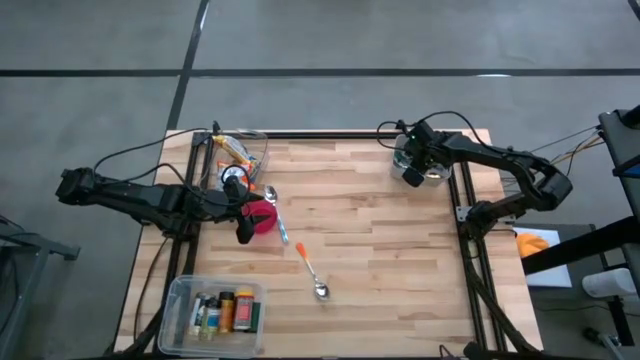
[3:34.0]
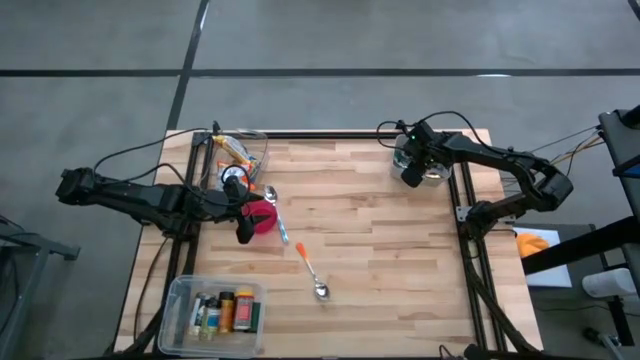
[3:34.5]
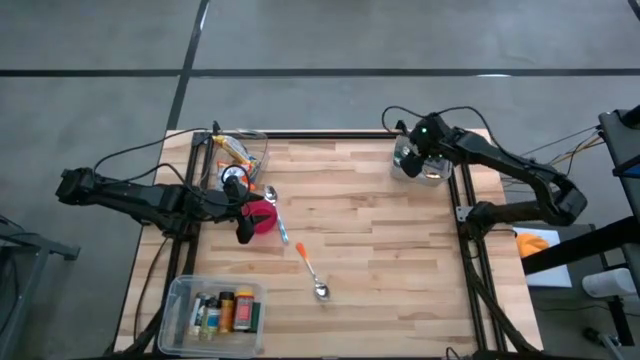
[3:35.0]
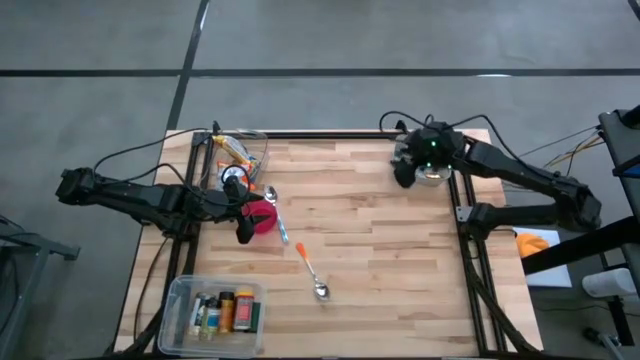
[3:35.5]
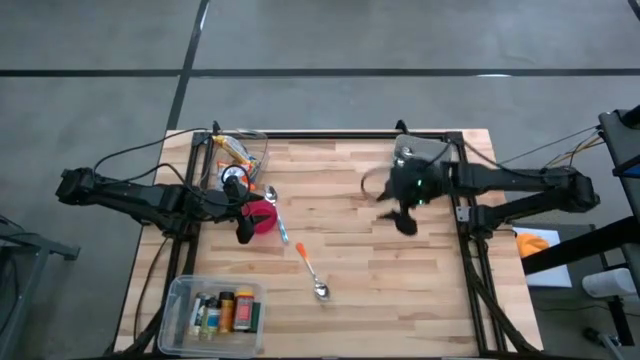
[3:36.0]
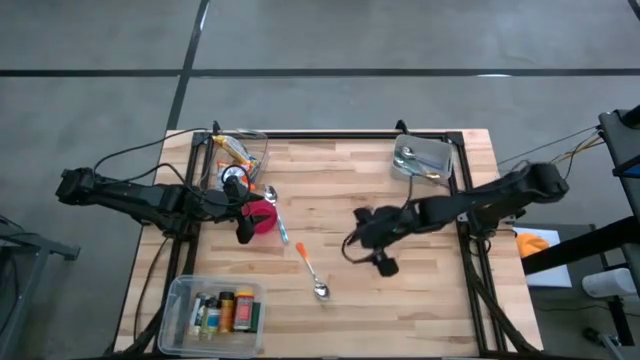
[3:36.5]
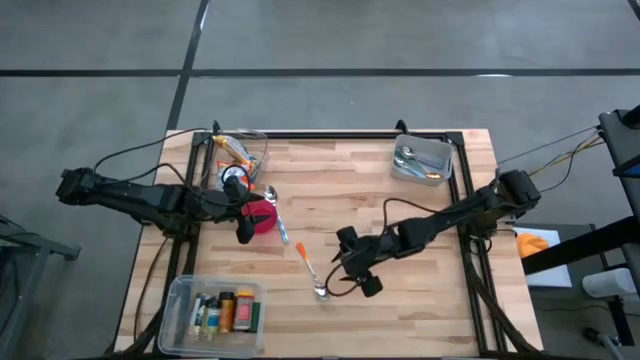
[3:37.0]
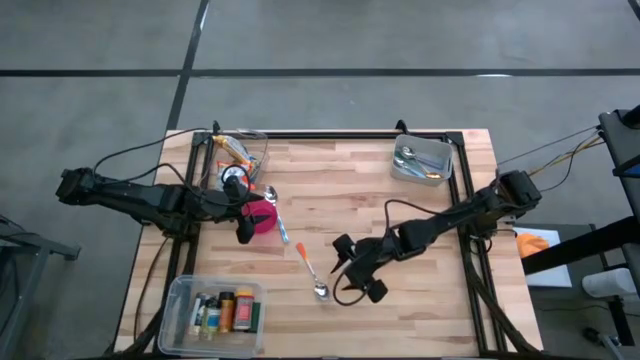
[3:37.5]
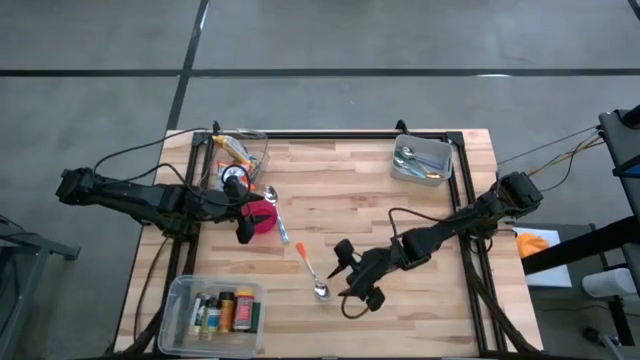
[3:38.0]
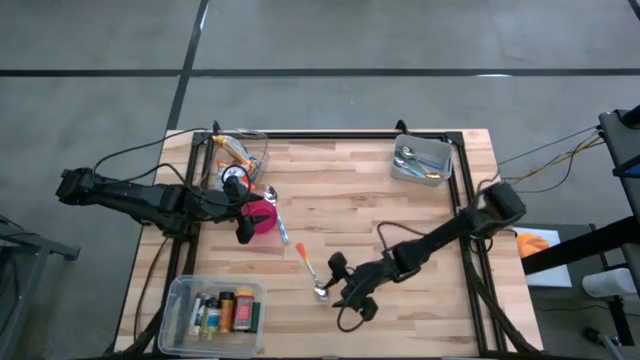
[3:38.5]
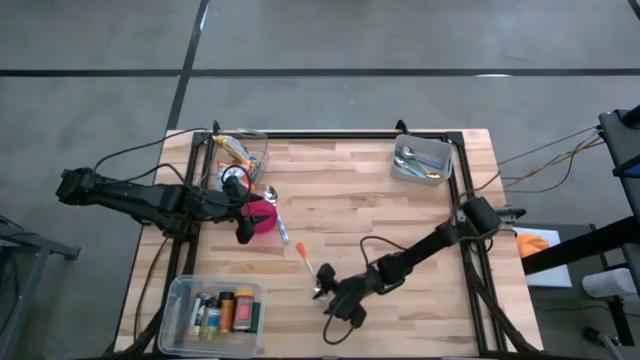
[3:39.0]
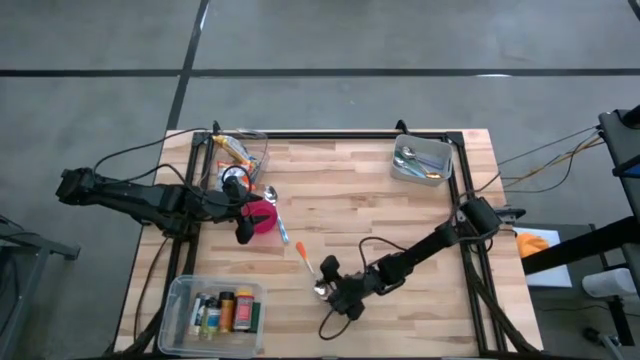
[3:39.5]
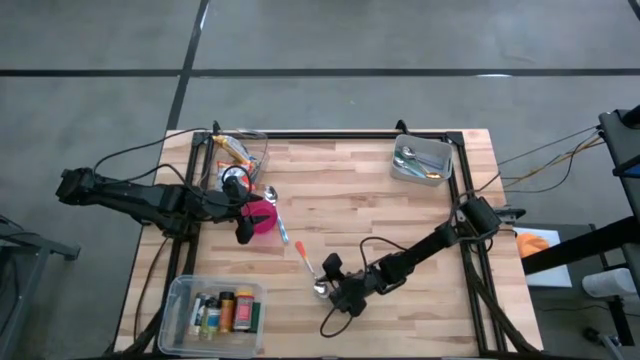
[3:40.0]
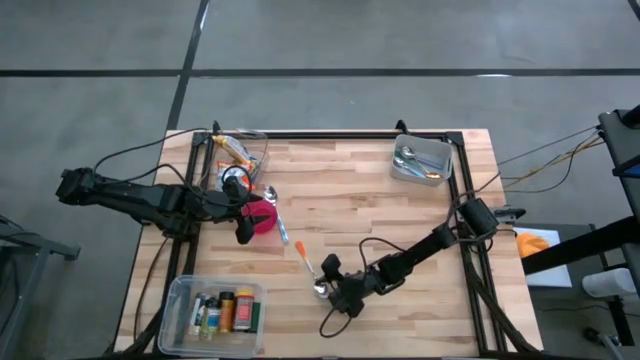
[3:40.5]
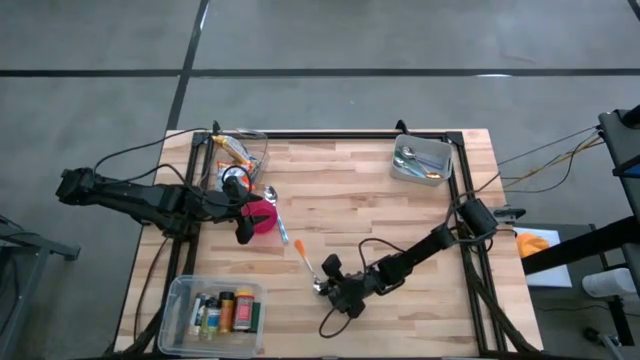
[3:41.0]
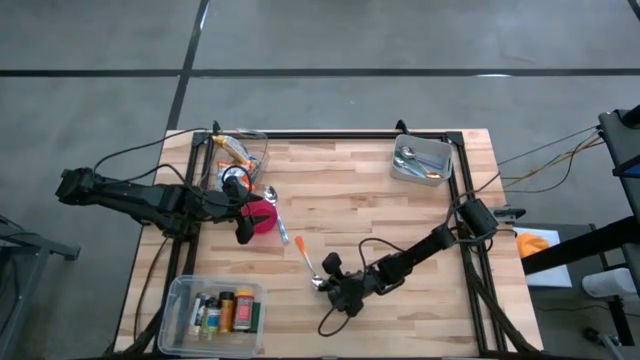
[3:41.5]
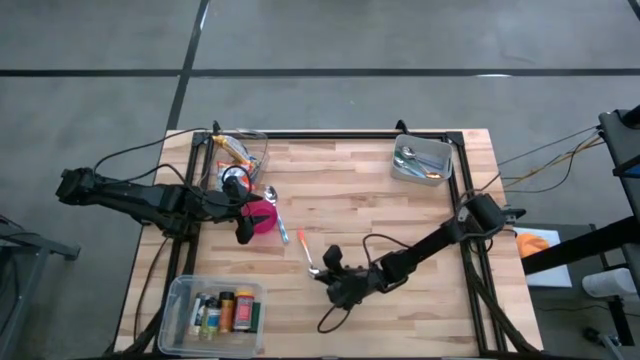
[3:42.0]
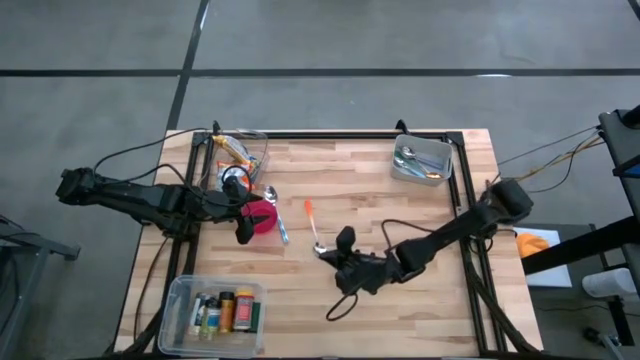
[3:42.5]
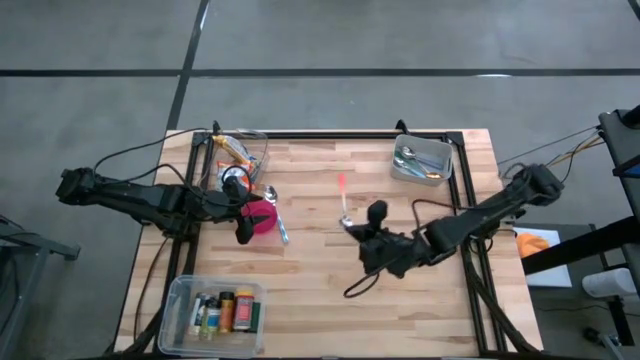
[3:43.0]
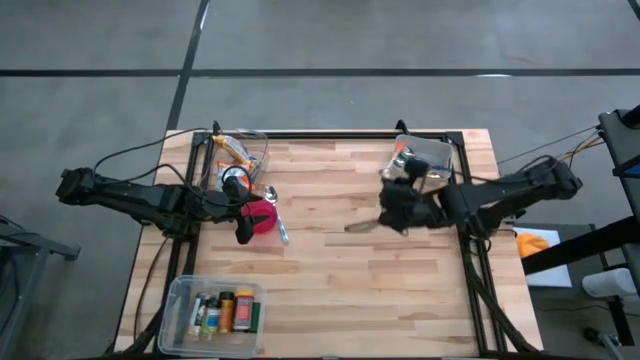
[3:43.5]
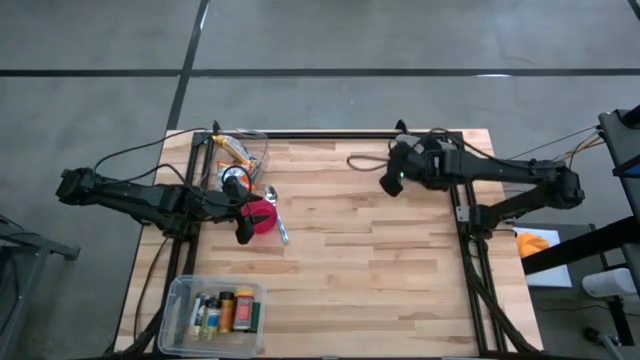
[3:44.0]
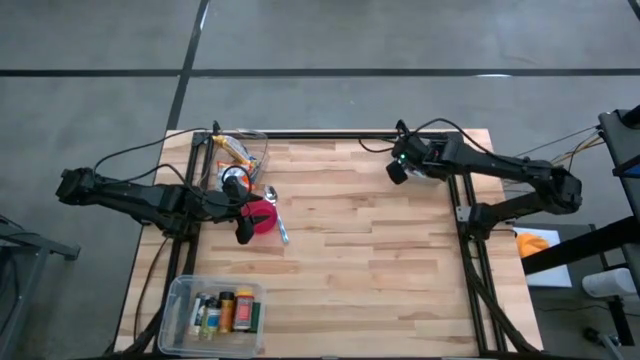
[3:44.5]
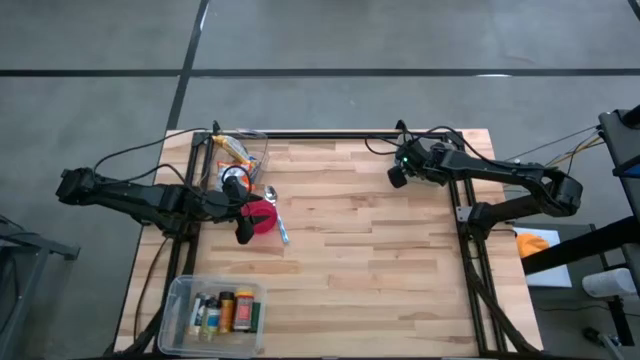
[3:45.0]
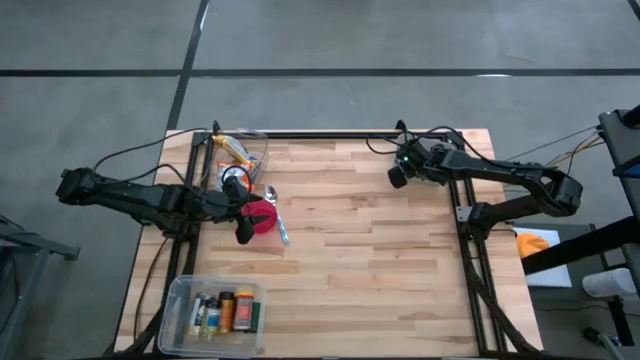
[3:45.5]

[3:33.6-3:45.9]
Put the orange spoon into the gray bin

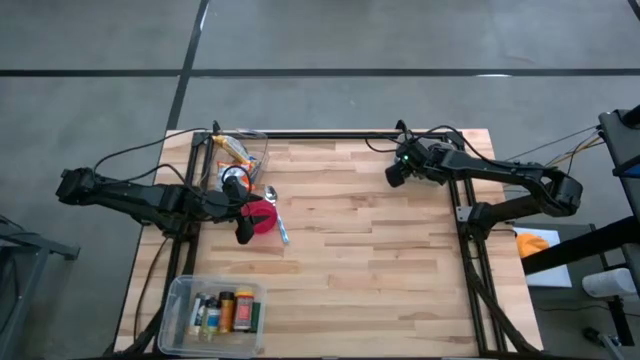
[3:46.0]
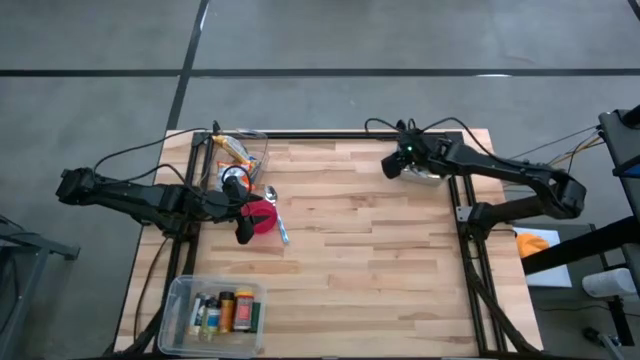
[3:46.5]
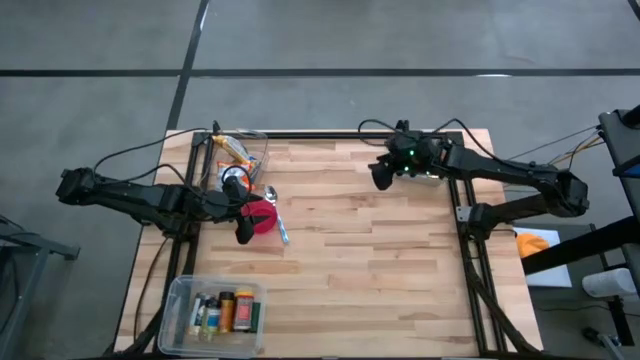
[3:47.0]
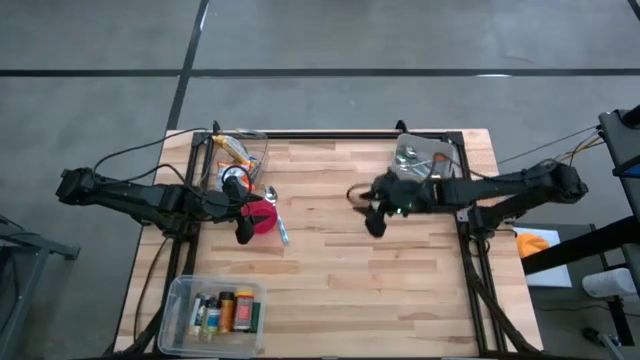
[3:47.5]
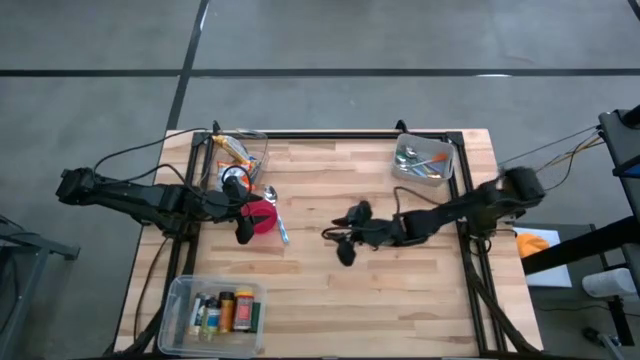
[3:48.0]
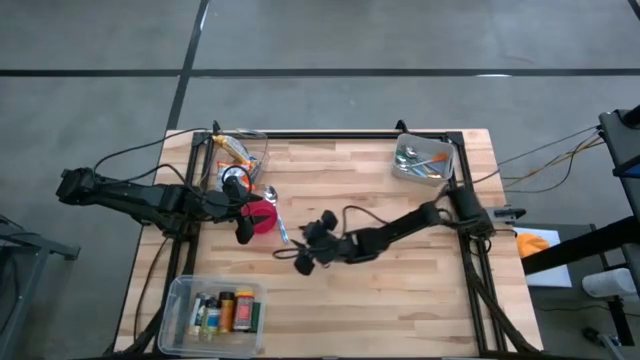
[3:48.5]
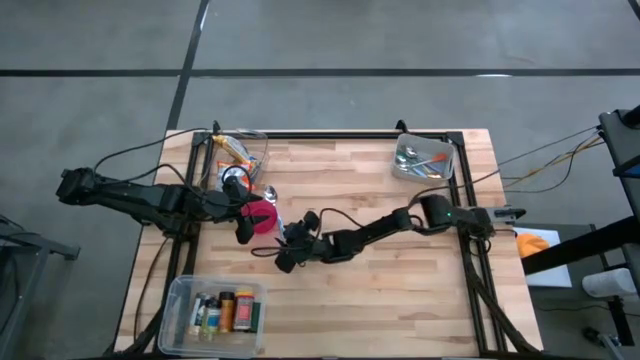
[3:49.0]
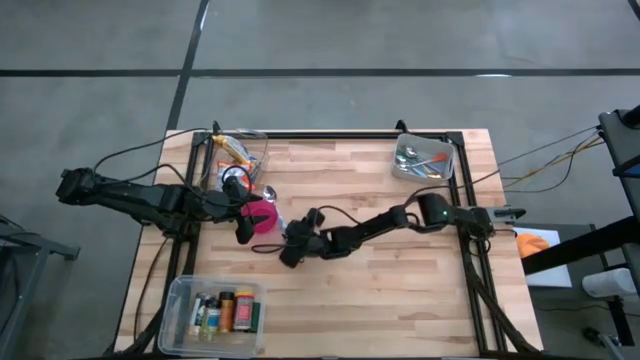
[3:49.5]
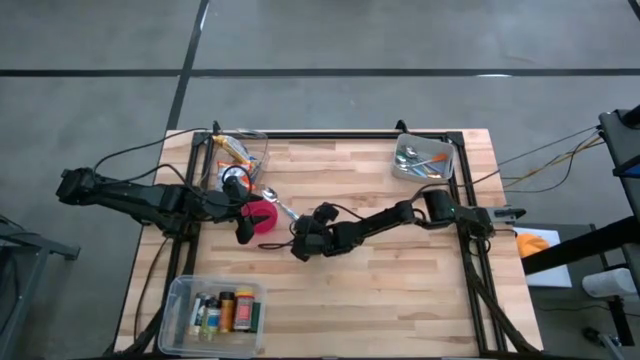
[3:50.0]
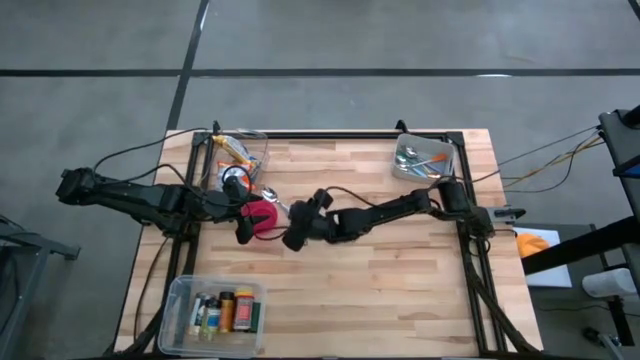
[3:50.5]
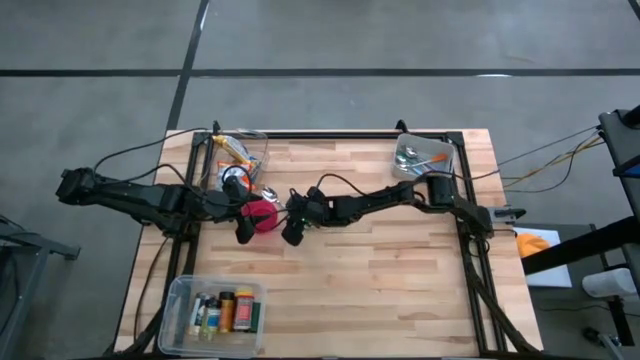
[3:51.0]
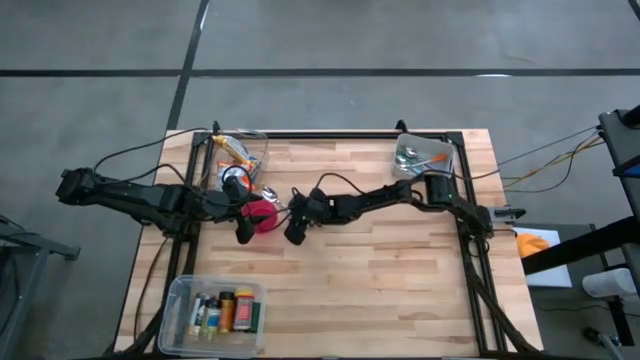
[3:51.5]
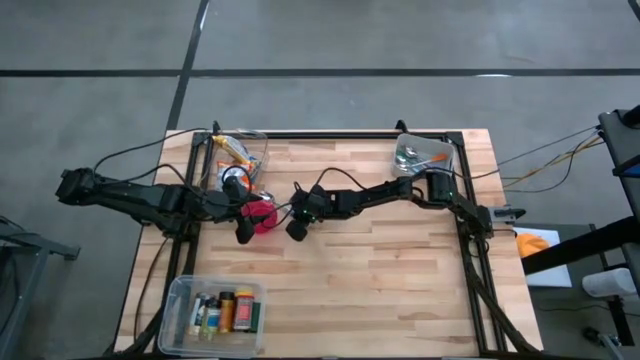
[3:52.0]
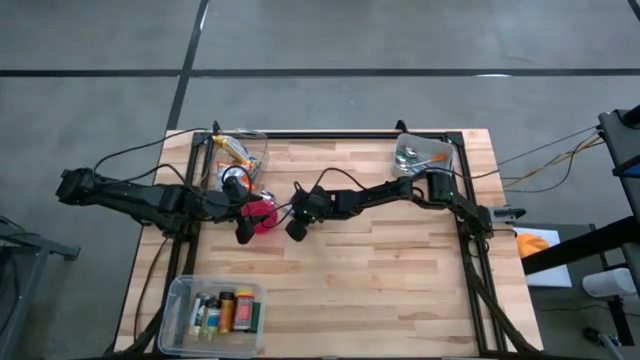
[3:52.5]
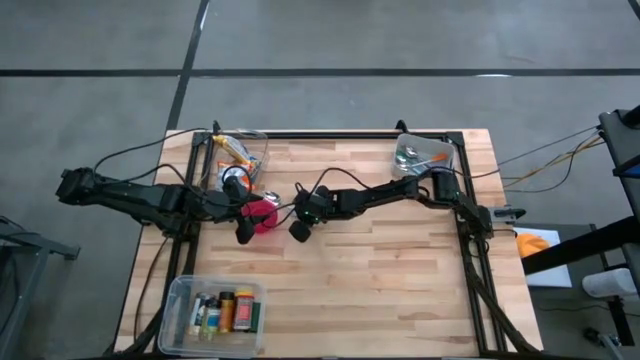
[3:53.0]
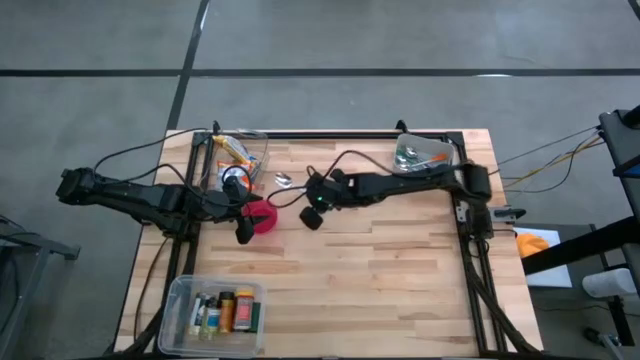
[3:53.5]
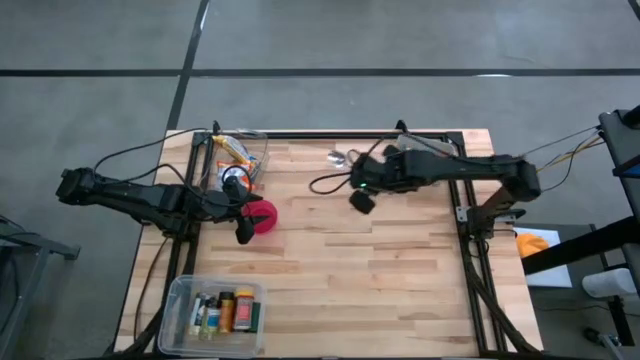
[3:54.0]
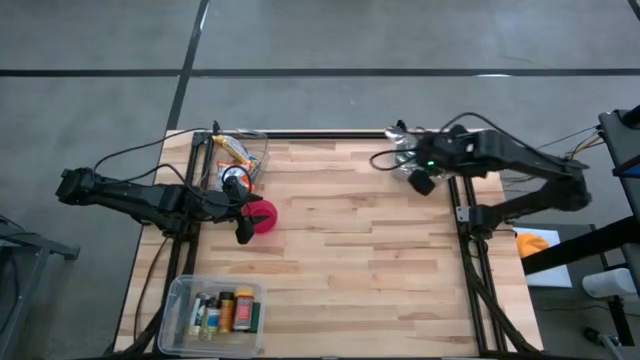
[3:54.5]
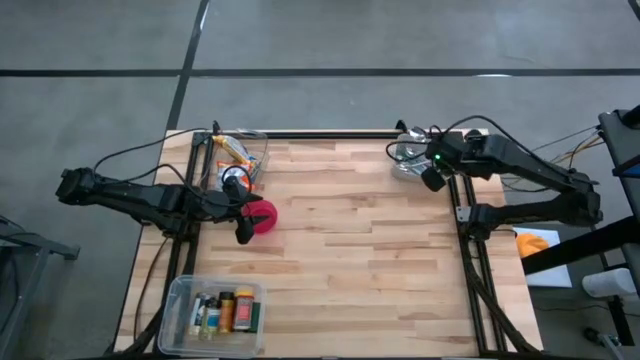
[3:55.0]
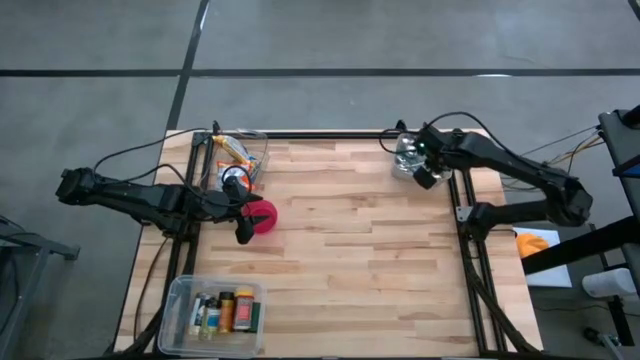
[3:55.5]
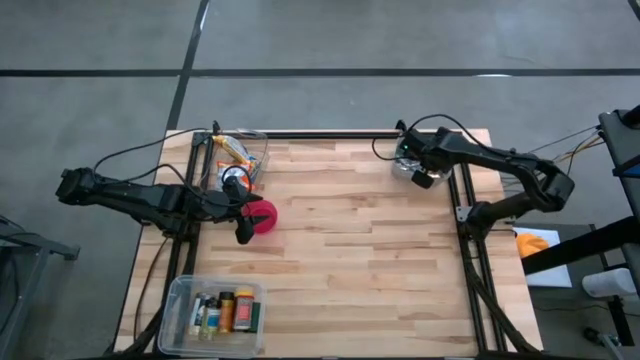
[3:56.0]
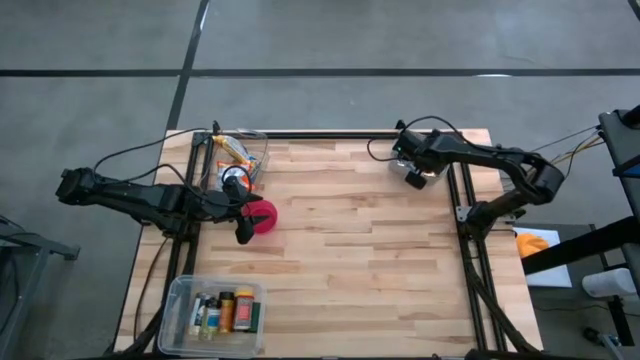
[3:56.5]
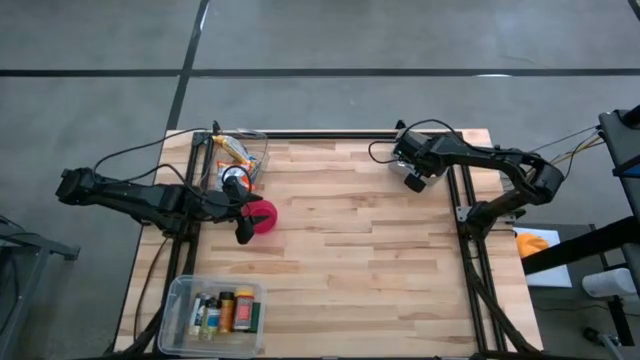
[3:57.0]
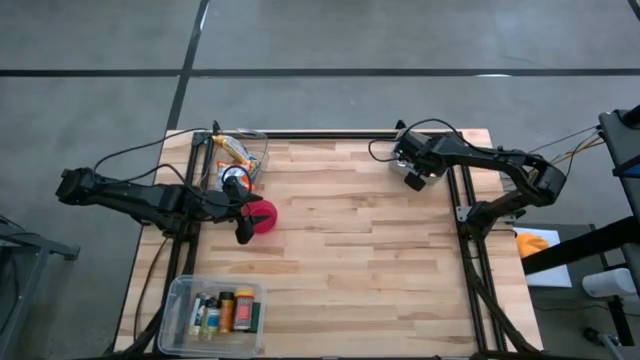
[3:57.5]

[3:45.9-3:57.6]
Put the blue patterned spoon into the gray bin
